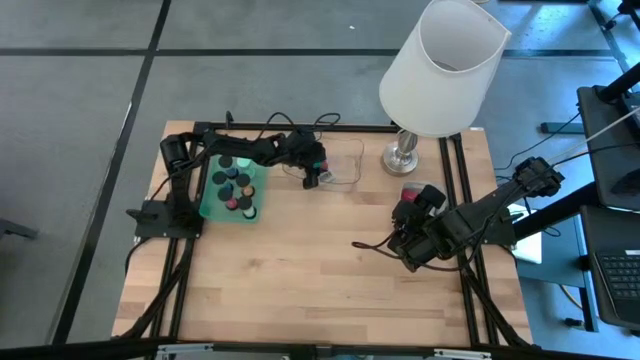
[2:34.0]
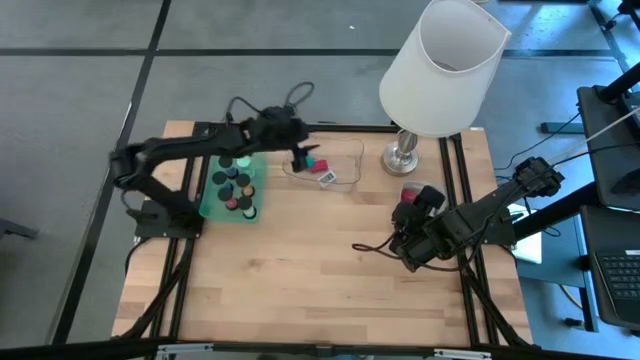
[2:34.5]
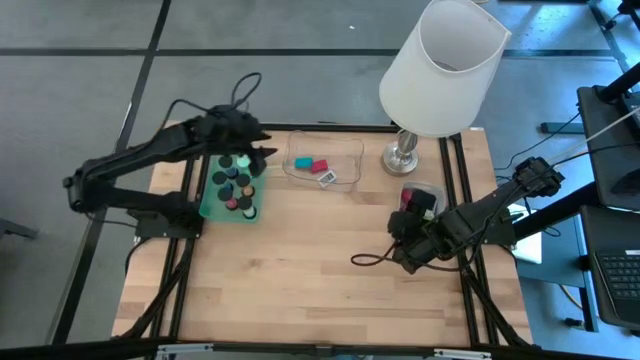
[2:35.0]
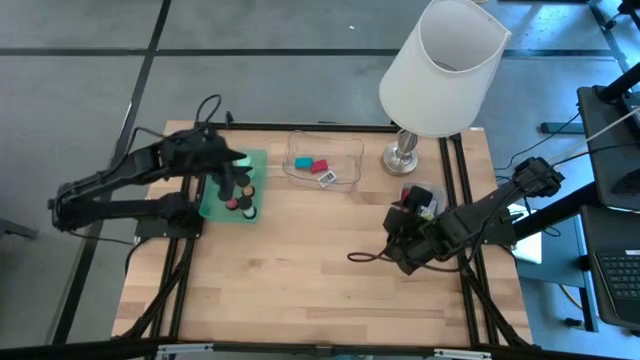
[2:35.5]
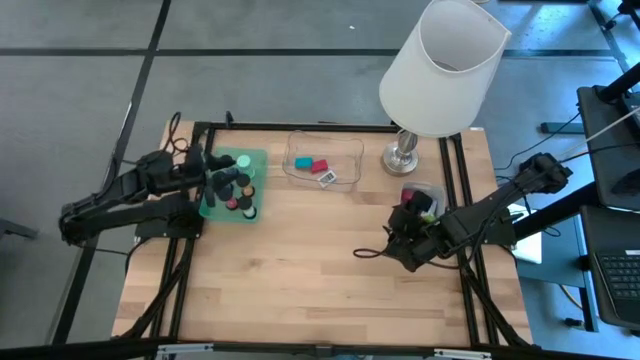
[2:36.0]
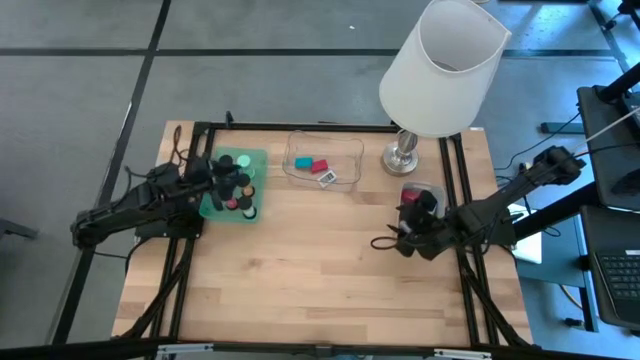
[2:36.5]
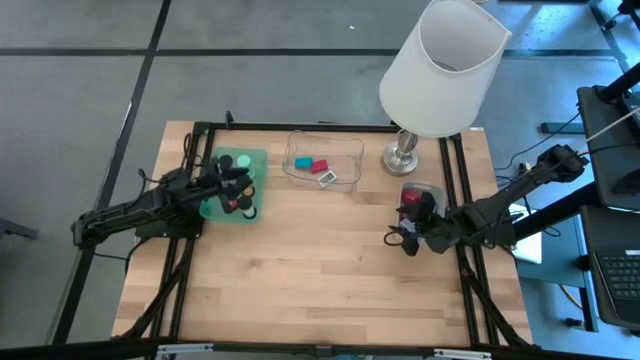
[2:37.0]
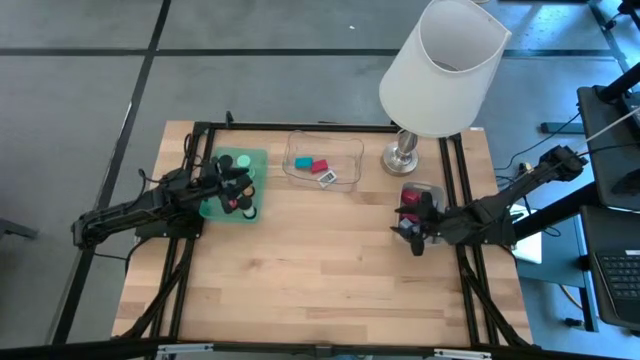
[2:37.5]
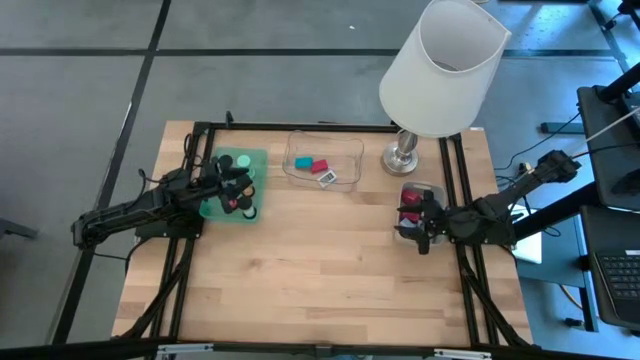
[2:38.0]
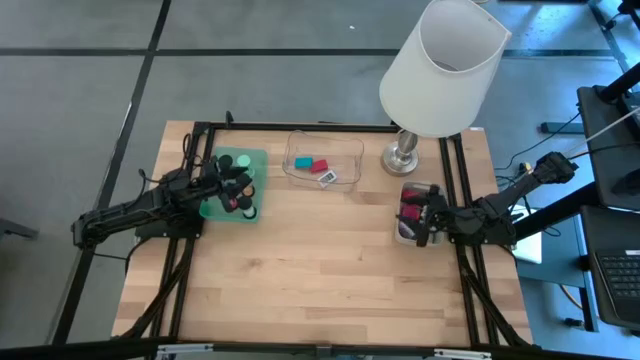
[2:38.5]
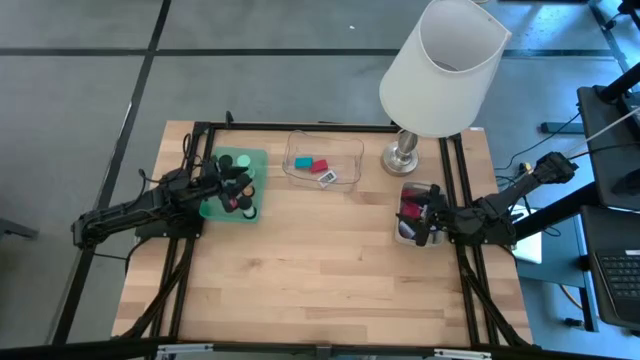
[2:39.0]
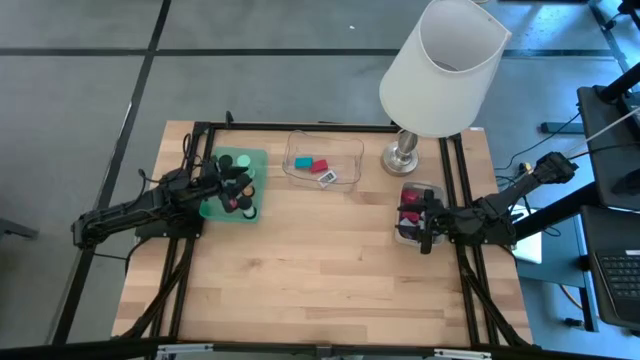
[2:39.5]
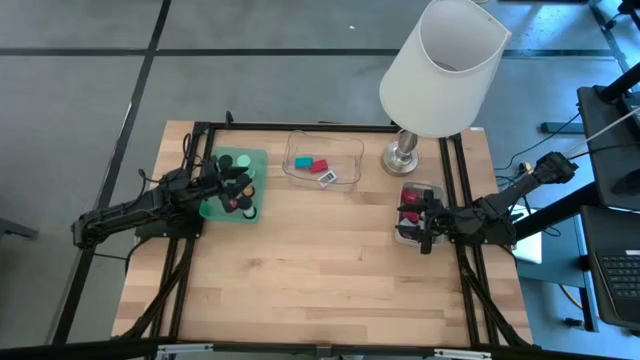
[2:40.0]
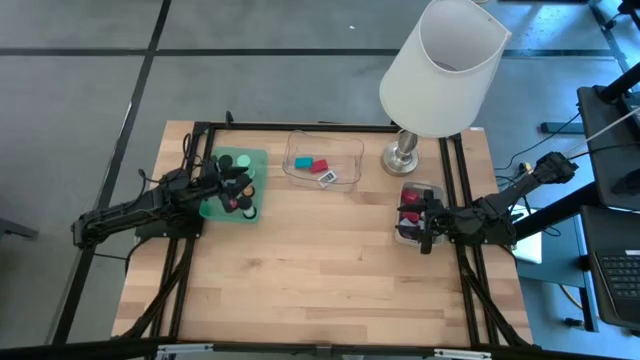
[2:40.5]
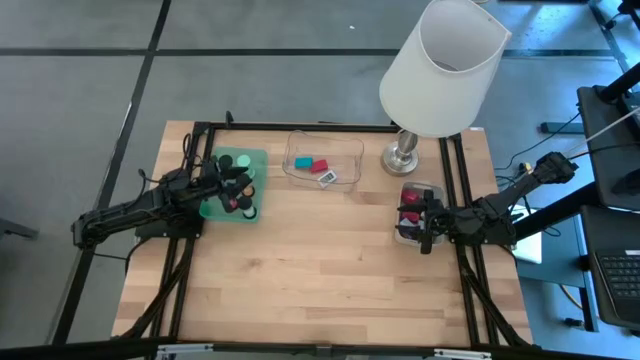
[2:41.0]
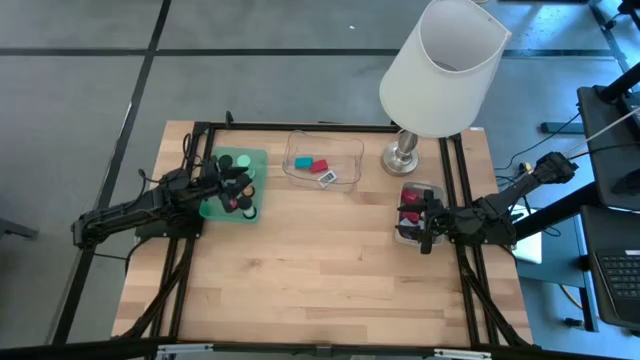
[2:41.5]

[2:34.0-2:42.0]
Task: Pick & Place Office items
Return to Home Position

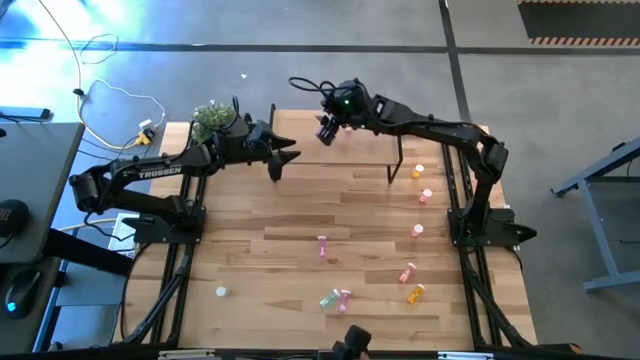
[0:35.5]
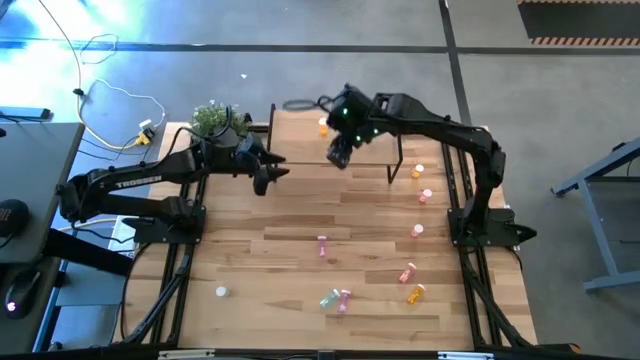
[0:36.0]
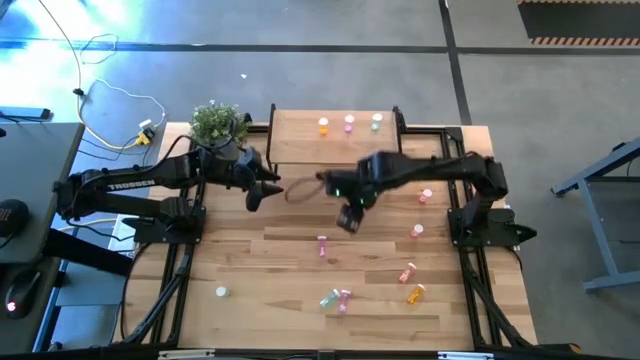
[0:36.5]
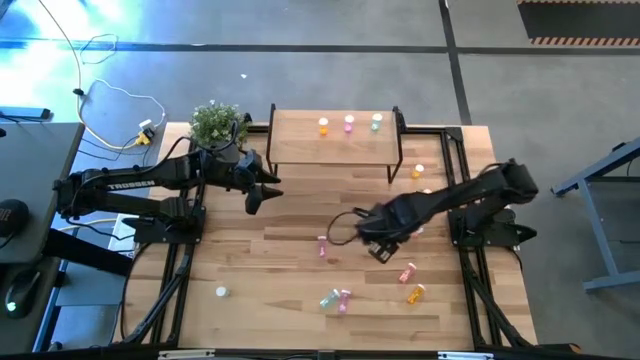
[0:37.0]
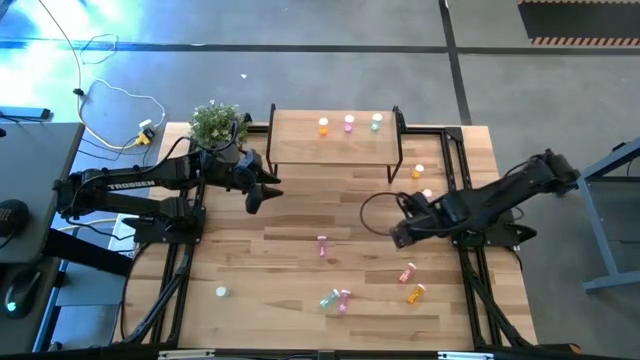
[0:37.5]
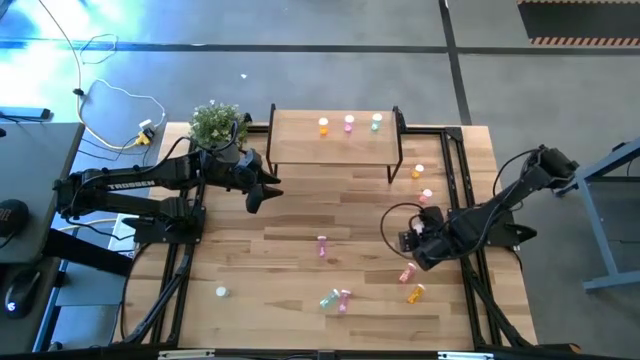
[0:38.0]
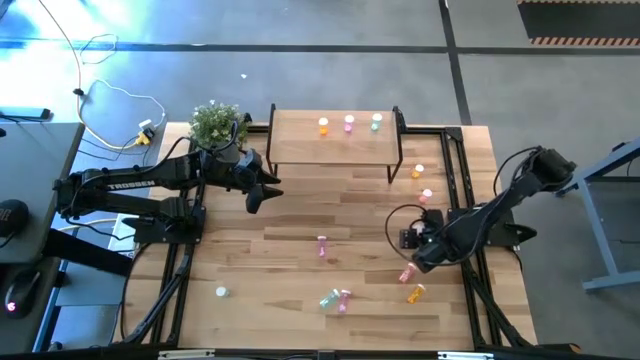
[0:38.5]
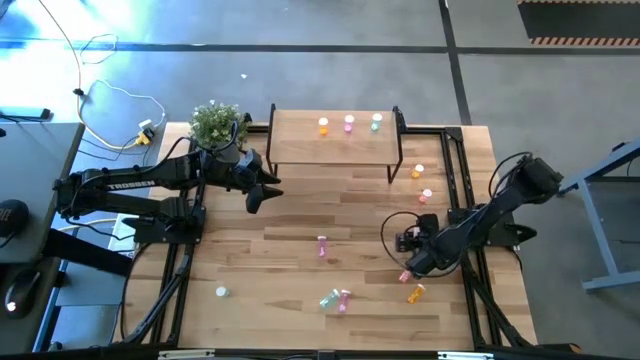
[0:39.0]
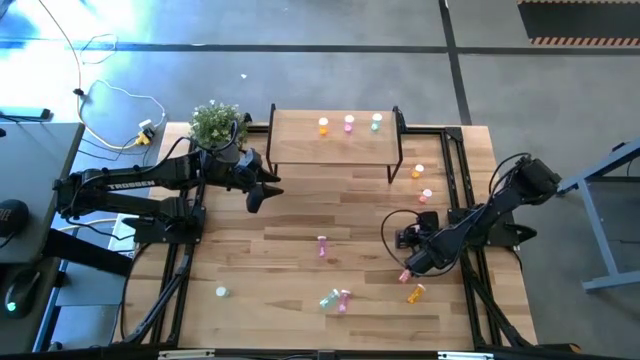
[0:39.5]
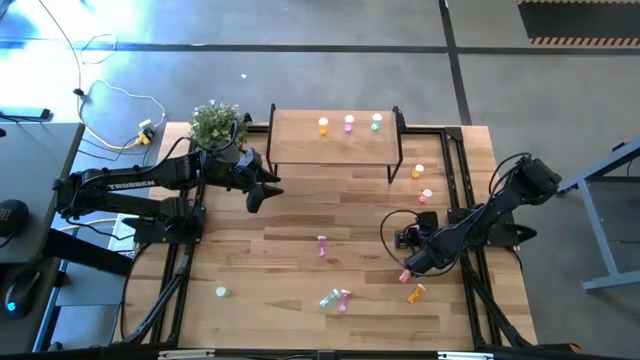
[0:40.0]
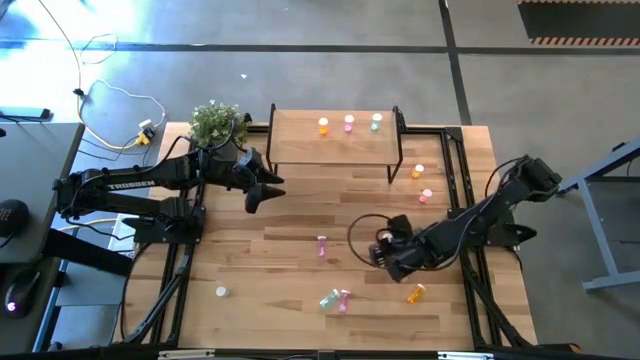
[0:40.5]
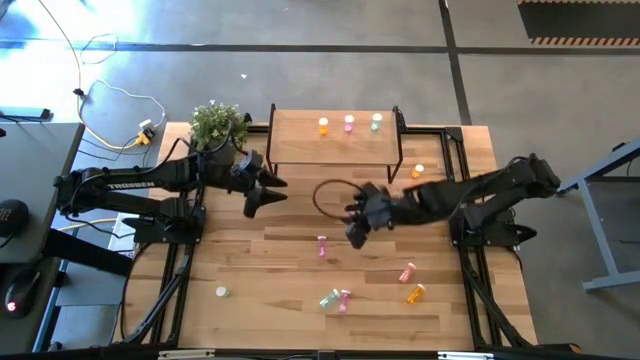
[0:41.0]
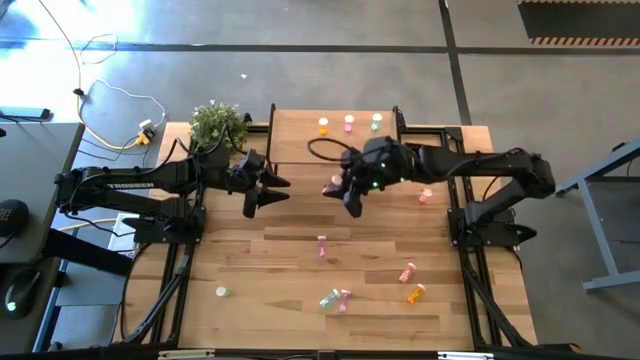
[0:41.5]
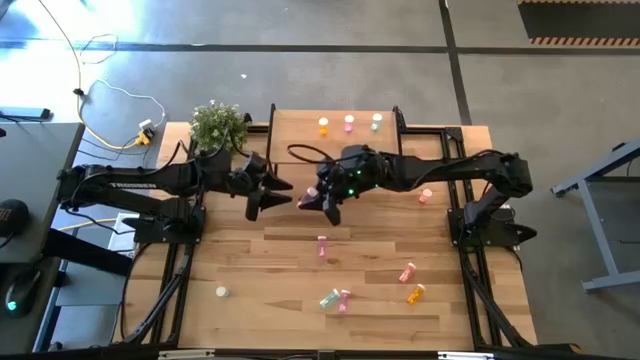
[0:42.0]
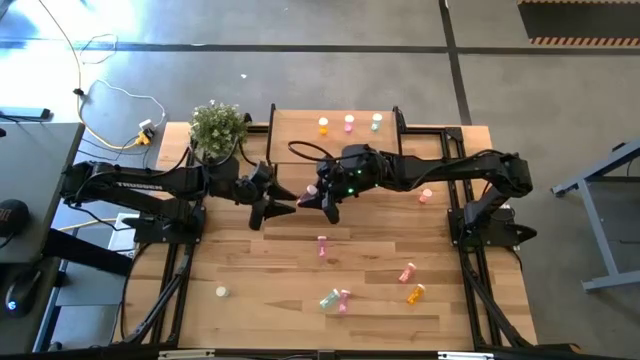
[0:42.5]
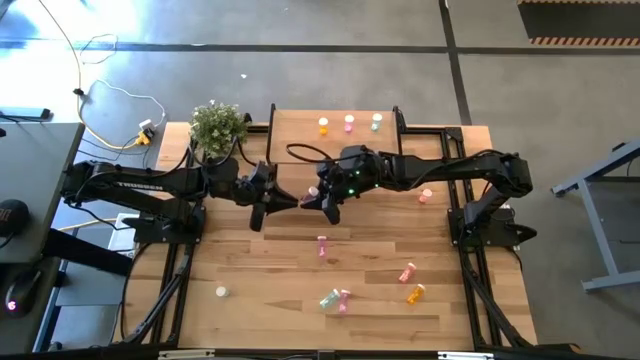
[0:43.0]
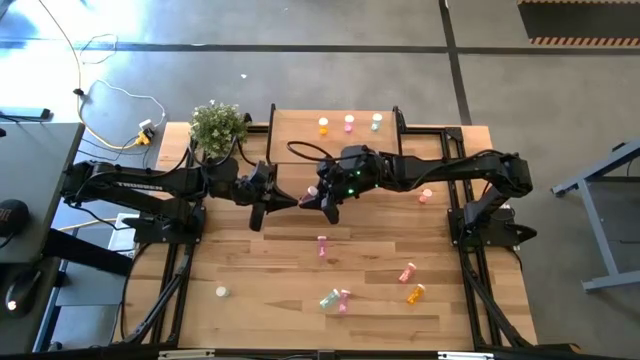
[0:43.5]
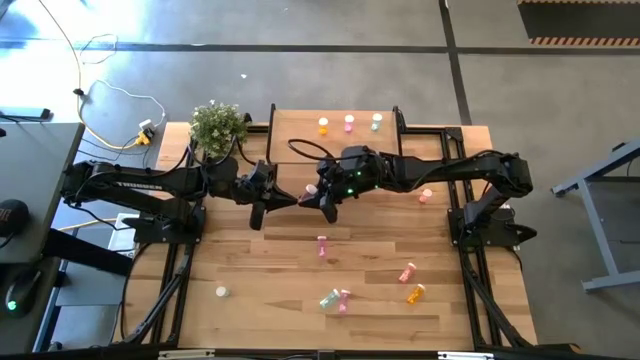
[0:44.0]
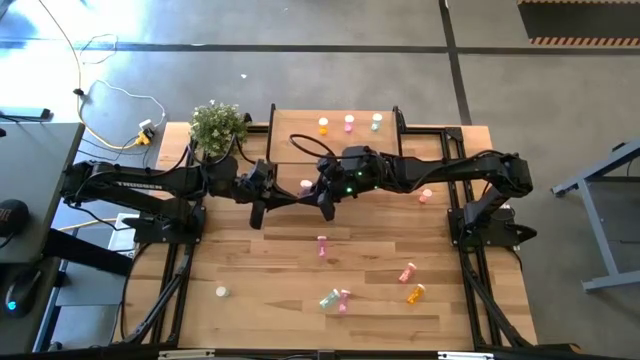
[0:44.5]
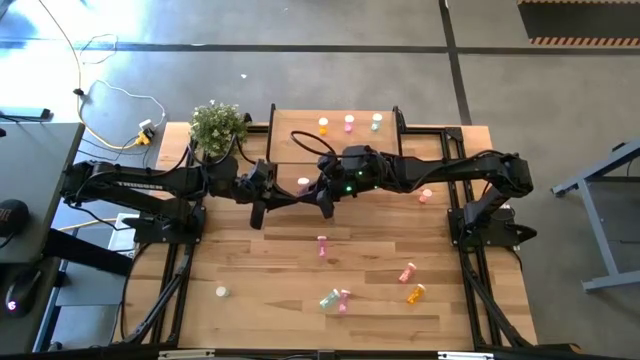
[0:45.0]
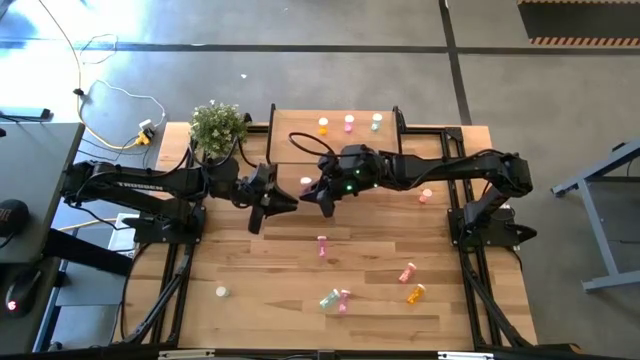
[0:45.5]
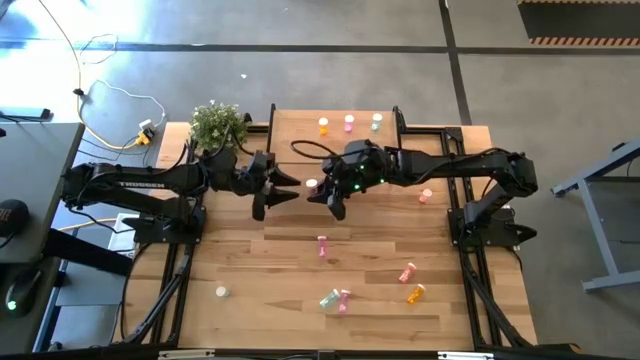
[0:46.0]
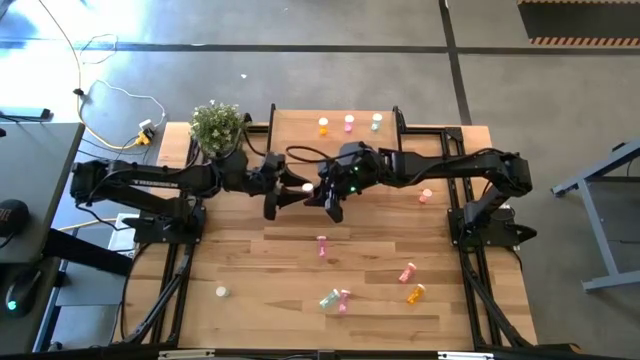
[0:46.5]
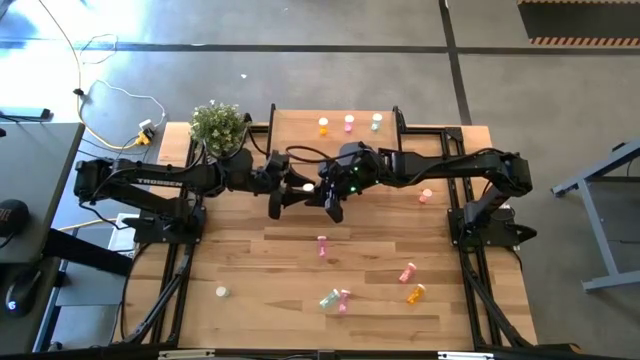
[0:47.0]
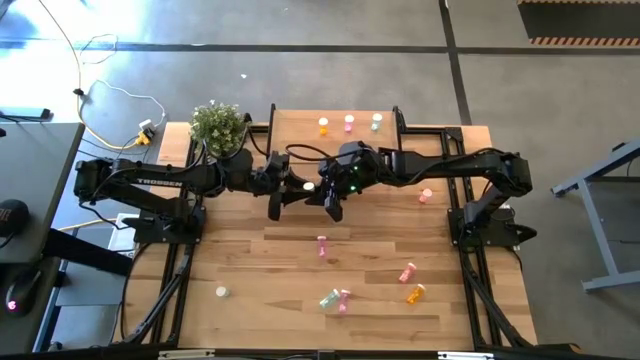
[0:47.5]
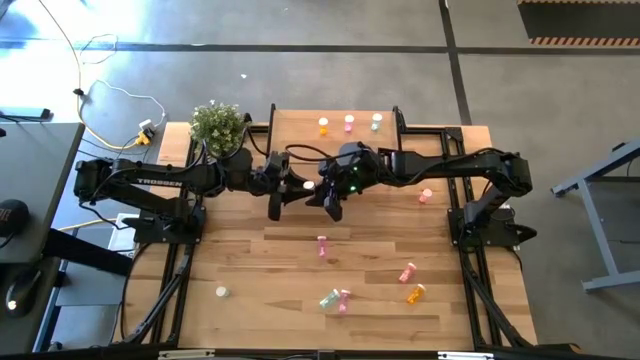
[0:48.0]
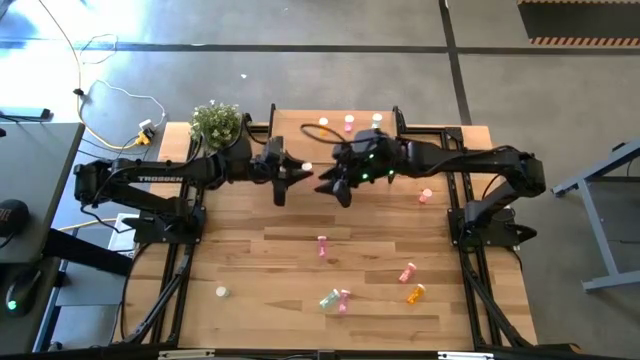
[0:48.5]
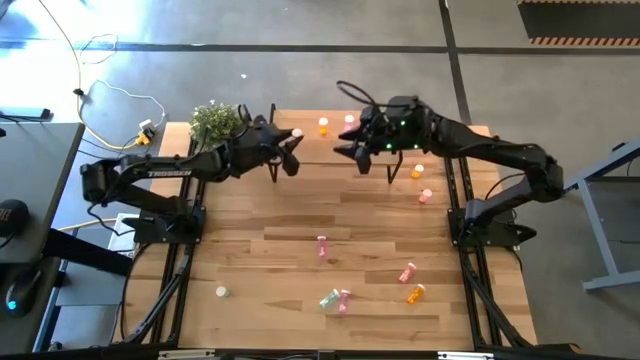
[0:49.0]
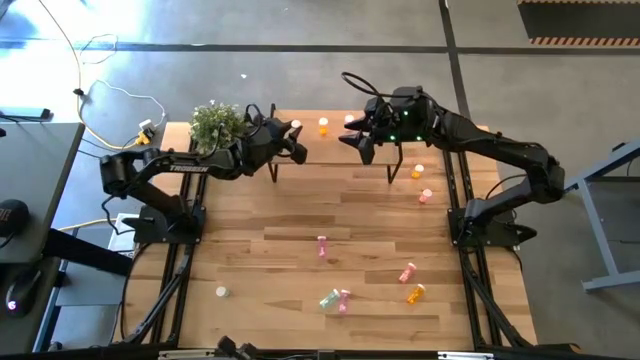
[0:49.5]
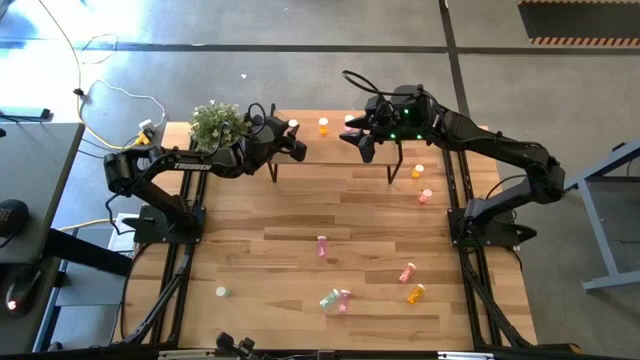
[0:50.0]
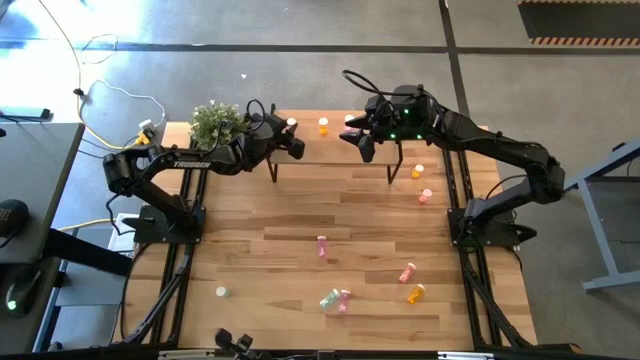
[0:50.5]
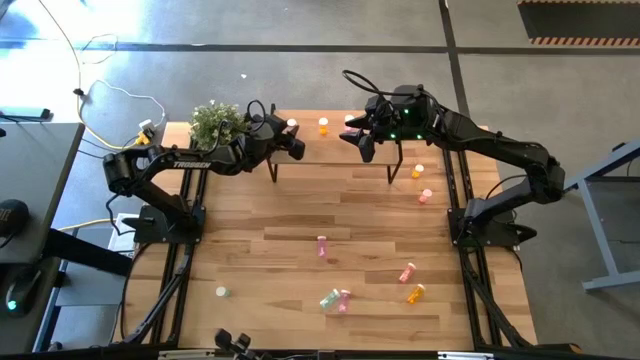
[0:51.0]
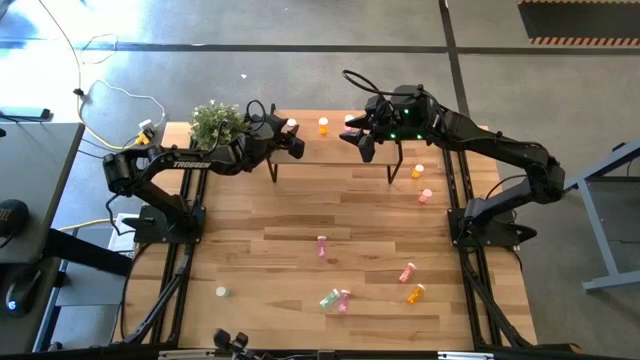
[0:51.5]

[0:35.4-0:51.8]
Task: Pick and place medicine bottles onto shelf by color
Put the middle pink pill bottle on the shelf
